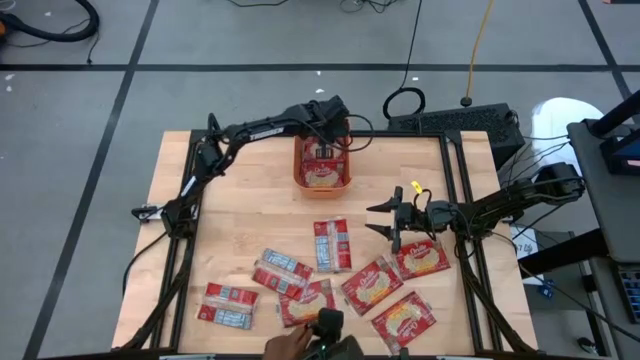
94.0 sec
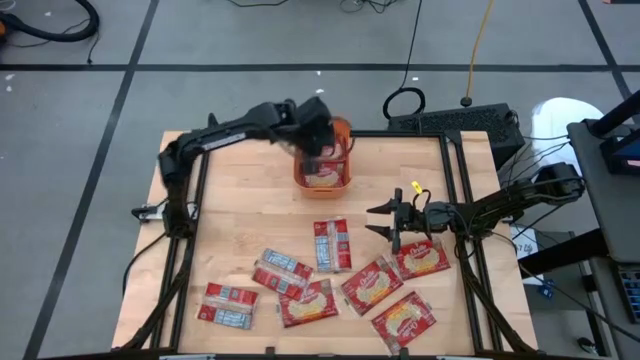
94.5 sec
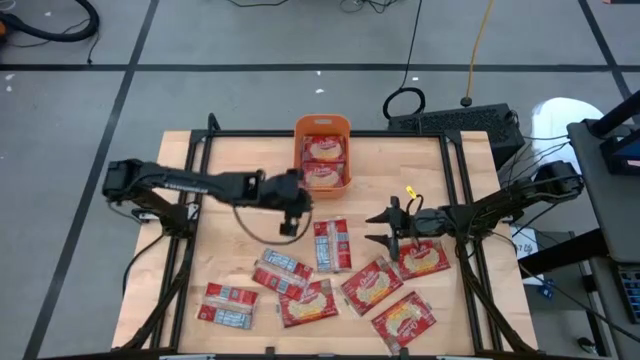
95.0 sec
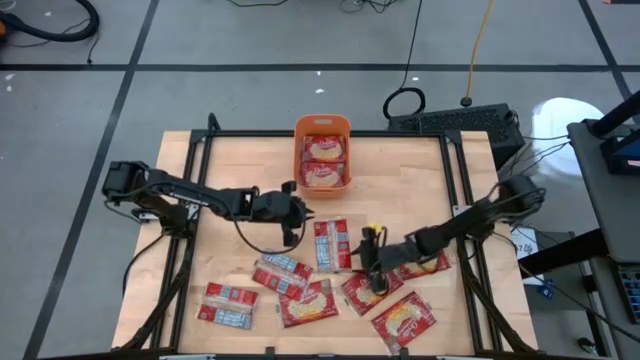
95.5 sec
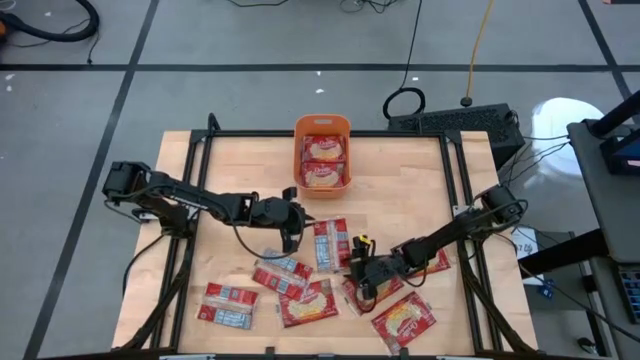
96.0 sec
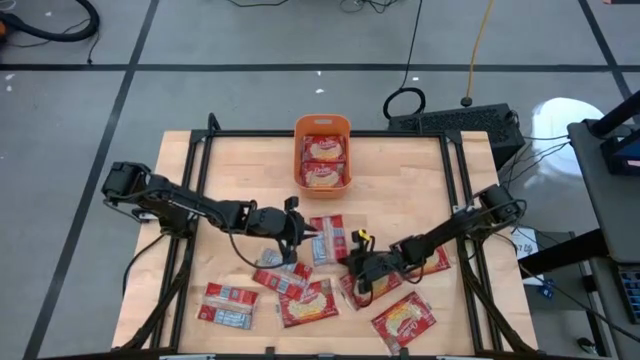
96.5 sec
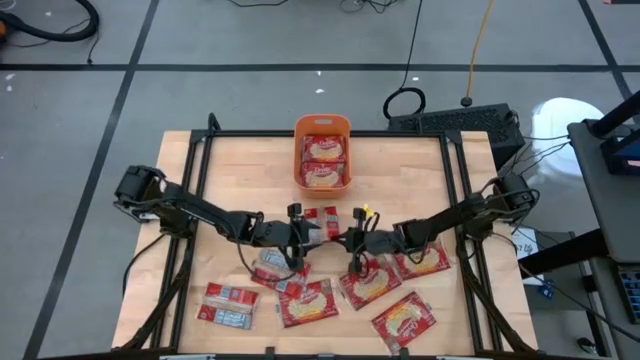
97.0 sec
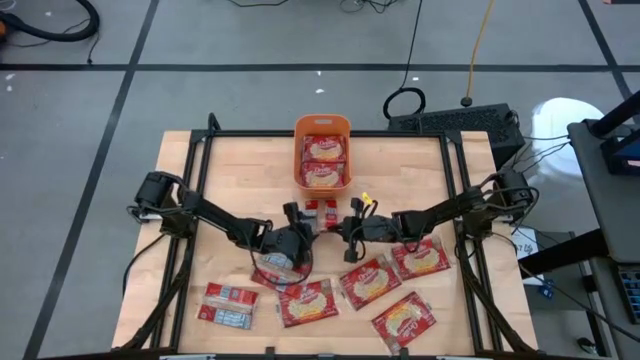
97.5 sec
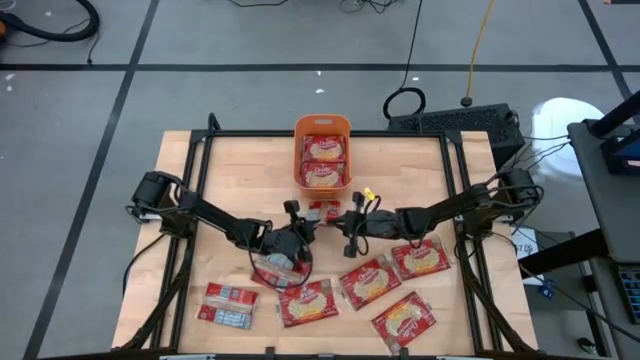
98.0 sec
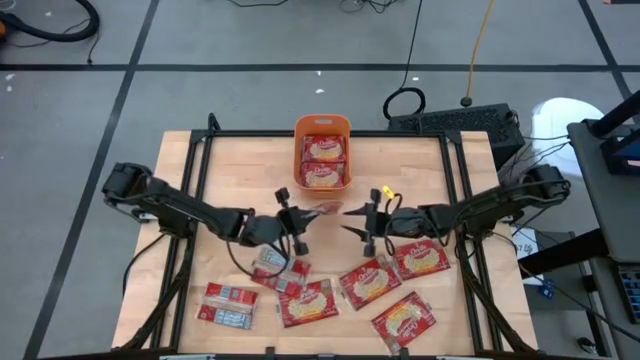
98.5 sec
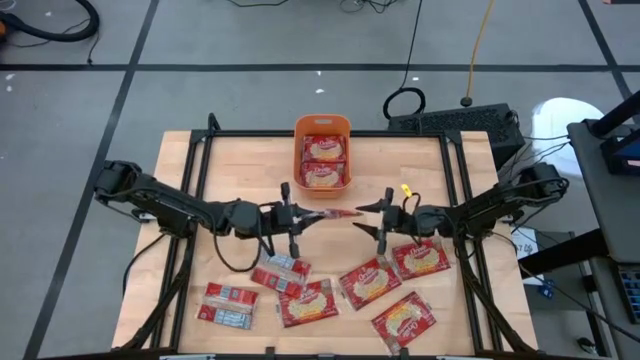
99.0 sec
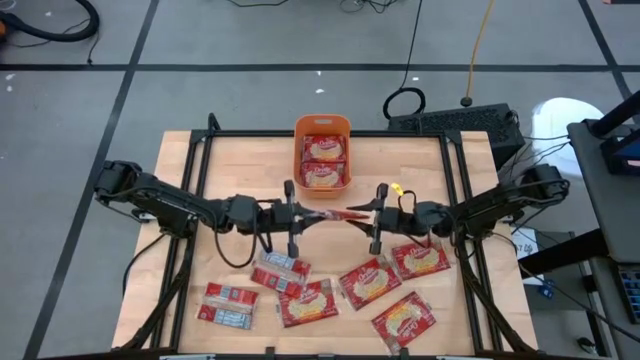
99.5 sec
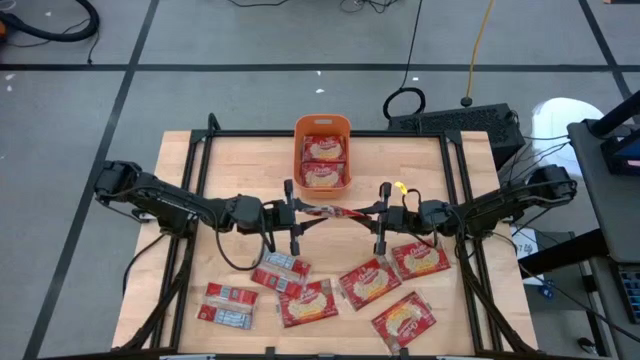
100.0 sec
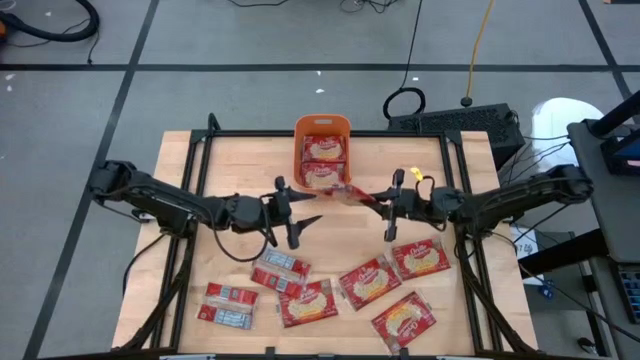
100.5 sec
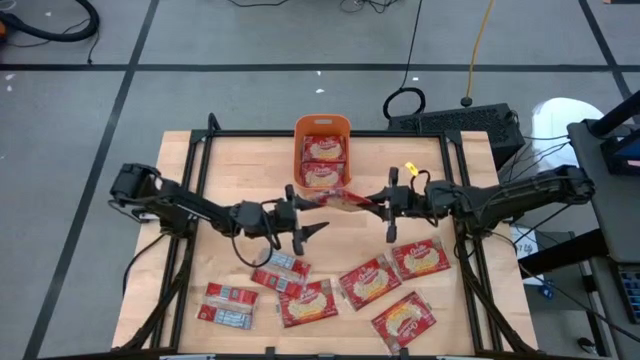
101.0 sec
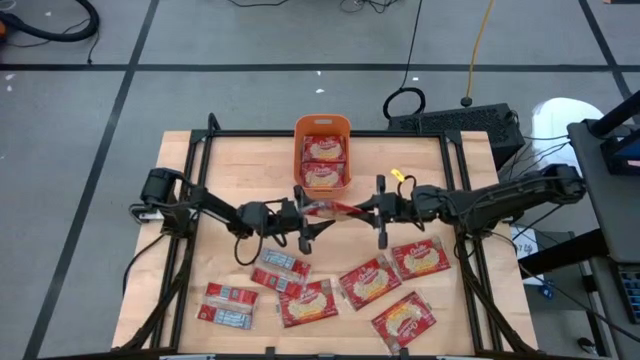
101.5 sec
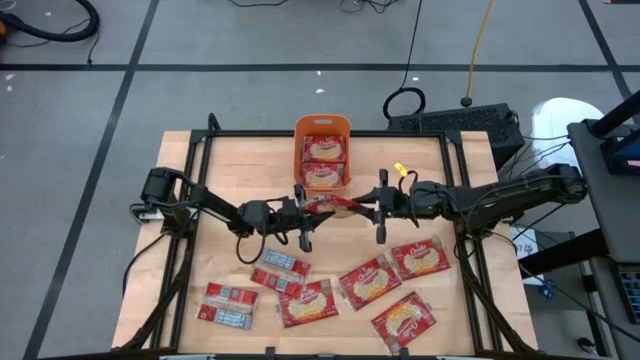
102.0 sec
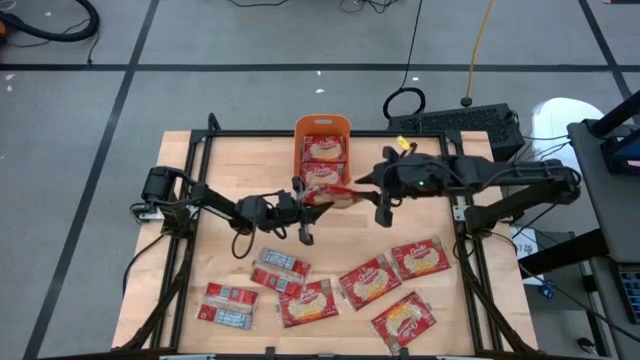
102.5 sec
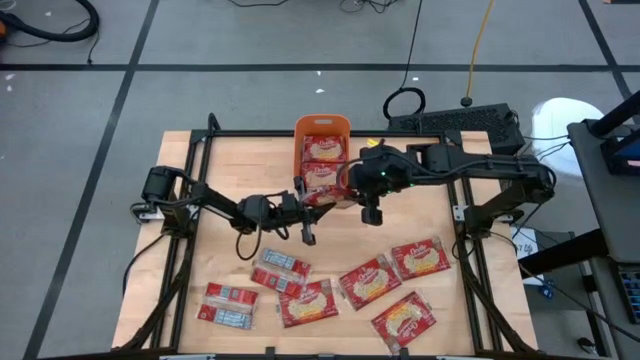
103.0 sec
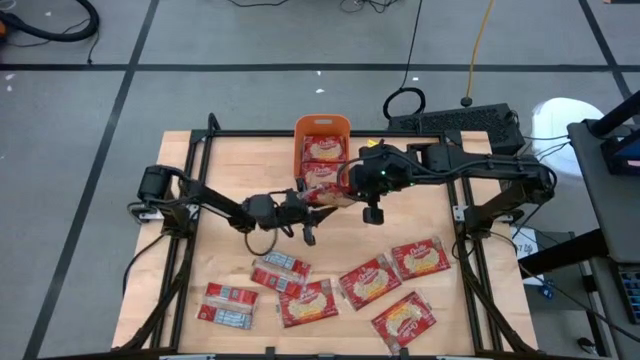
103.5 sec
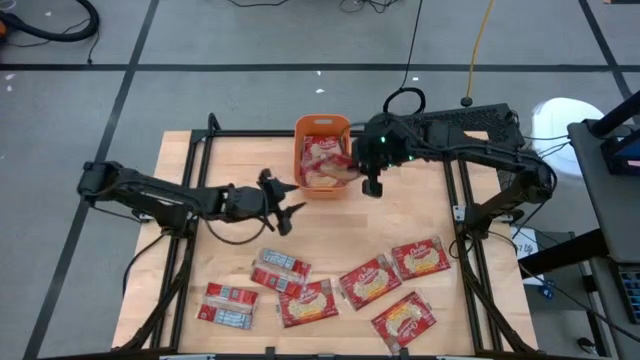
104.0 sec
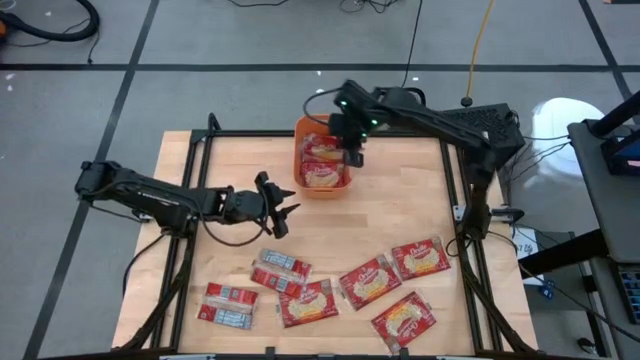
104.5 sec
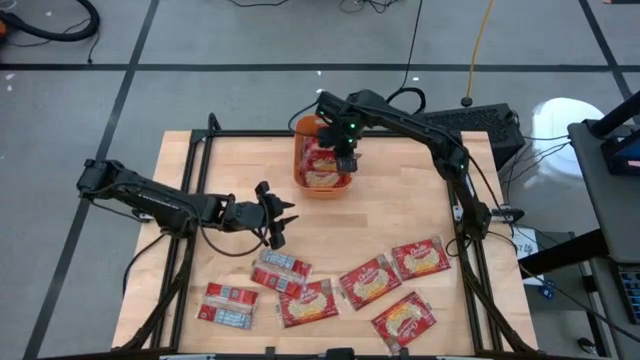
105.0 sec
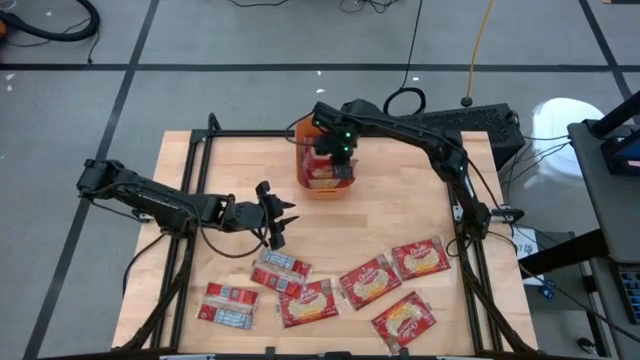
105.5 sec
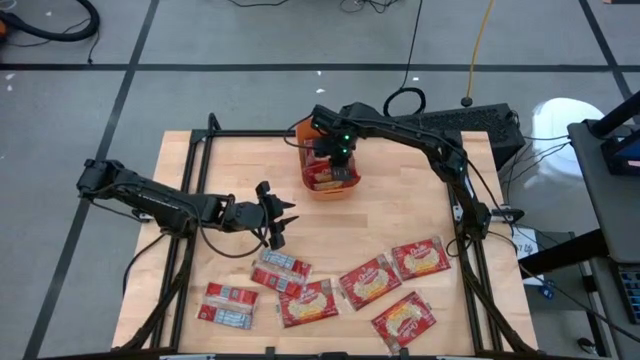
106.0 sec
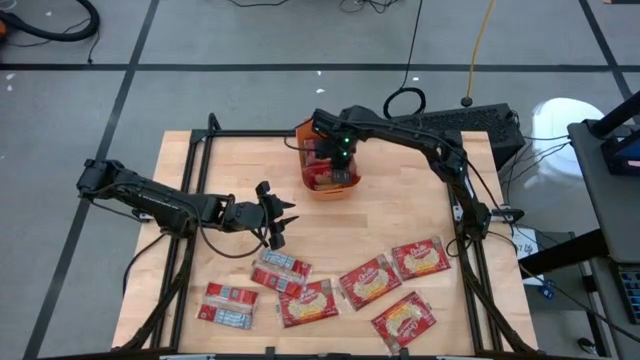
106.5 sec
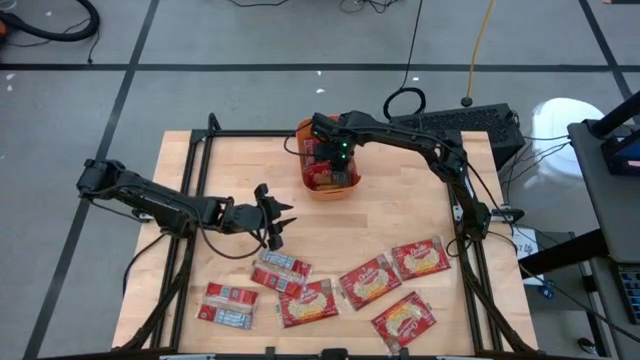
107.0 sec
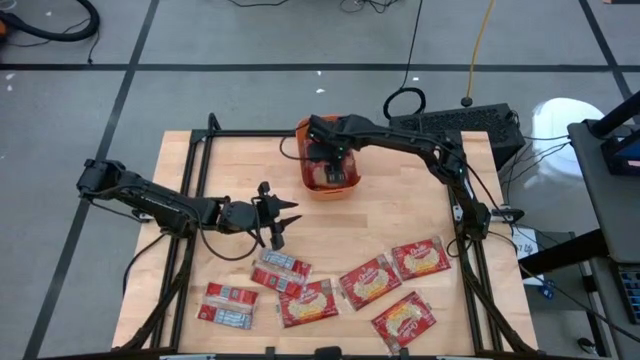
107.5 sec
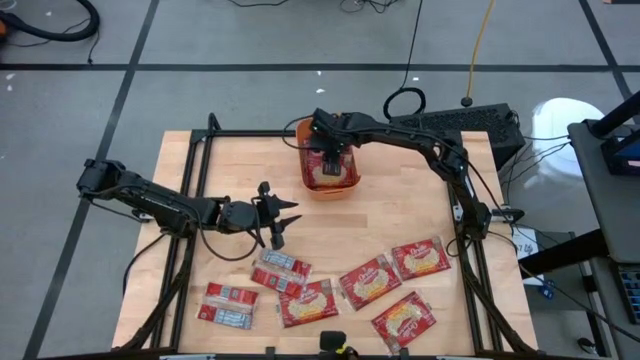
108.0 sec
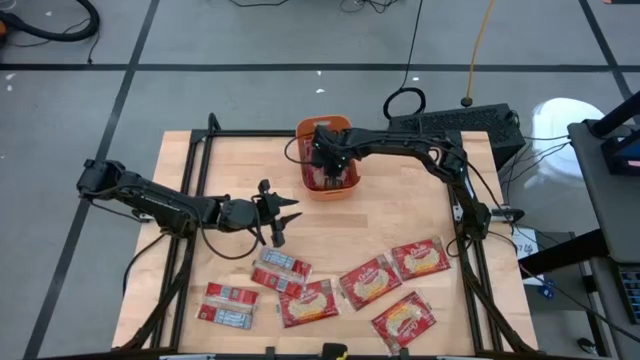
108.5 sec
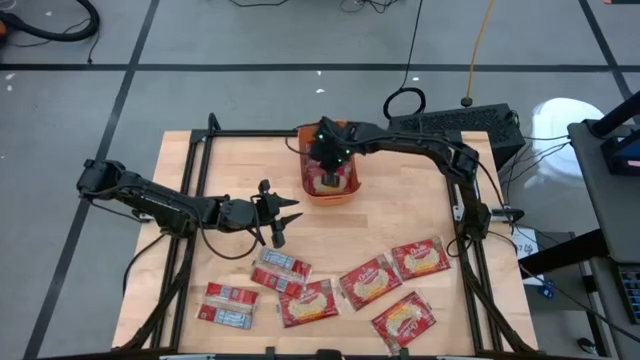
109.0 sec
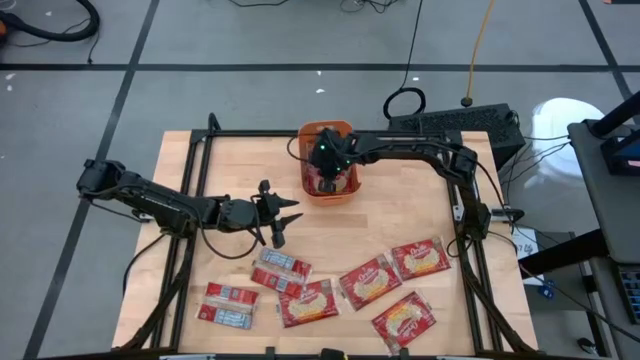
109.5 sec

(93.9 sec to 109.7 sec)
Task: Sort popcorn bags into baskets
Put the red popcorn bag into the orange bin

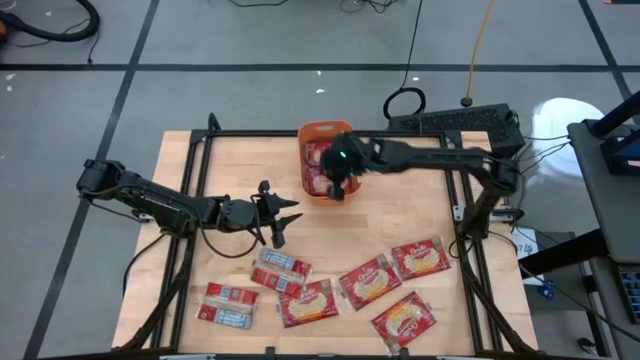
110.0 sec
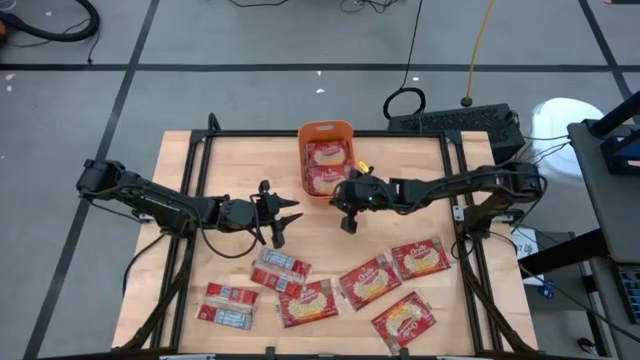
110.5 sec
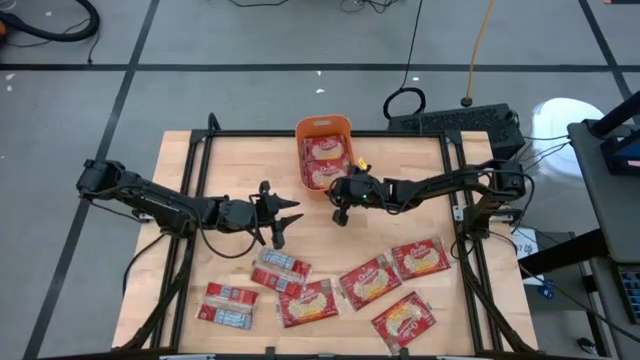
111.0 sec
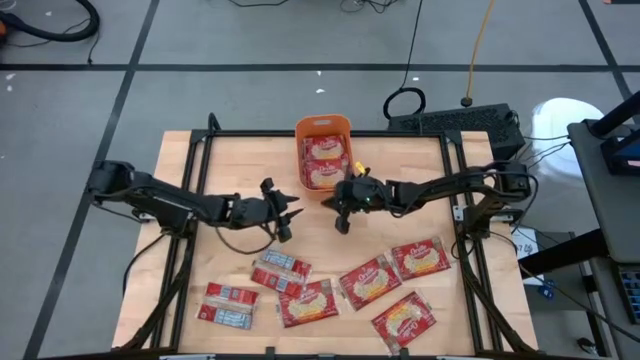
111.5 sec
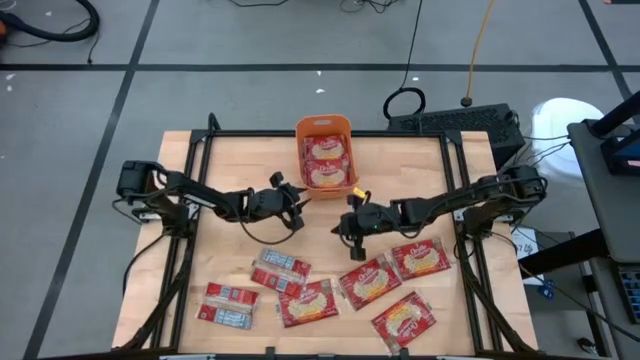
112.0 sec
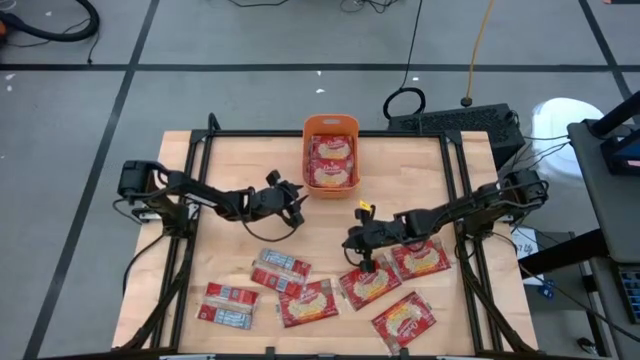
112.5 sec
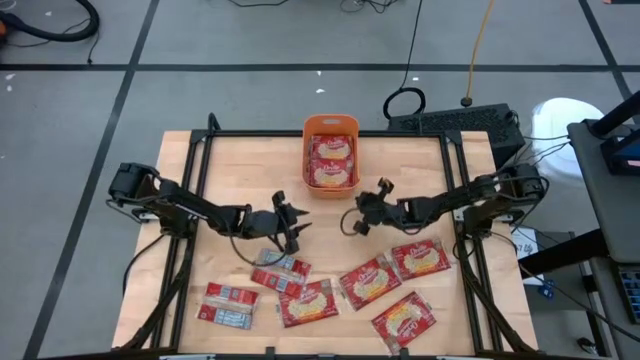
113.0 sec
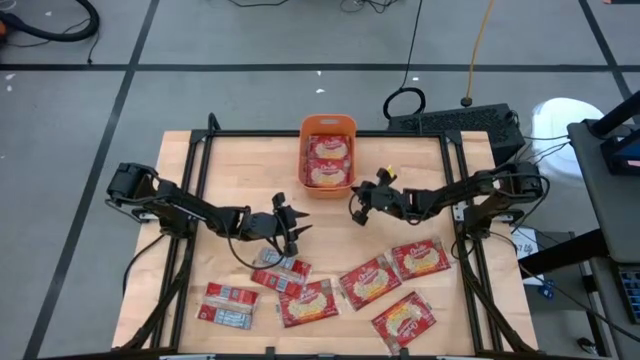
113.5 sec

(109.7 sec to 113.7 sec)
Adjust orange bin on the table

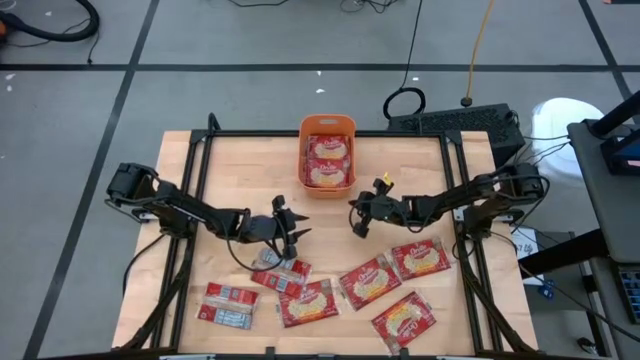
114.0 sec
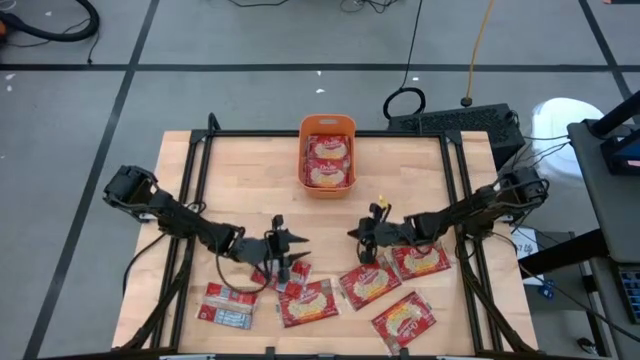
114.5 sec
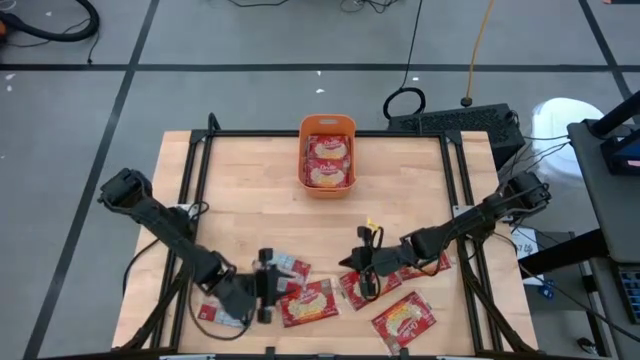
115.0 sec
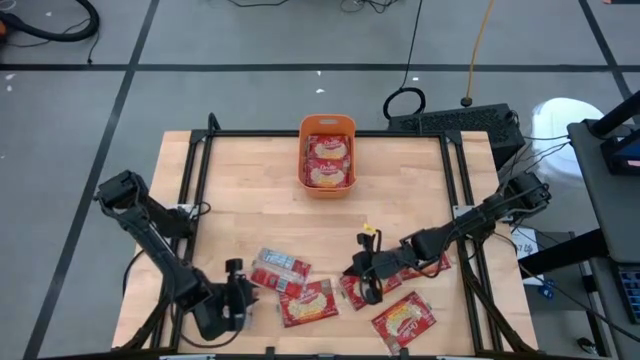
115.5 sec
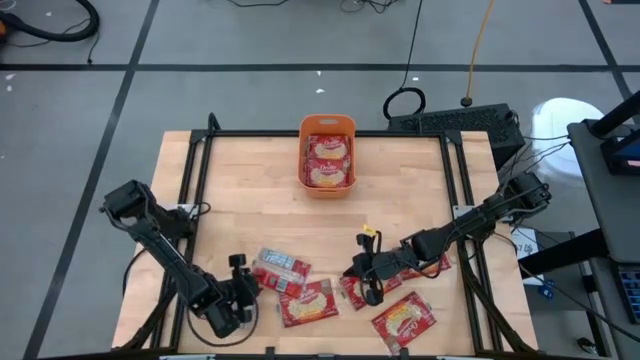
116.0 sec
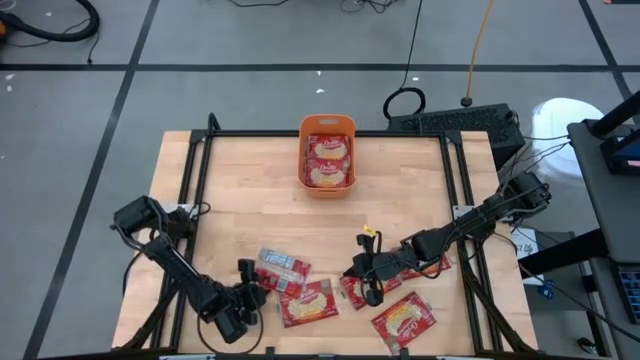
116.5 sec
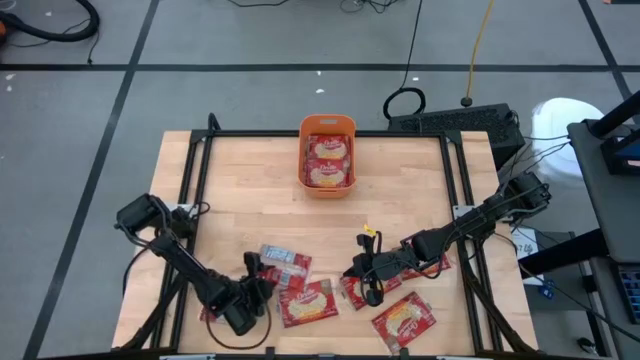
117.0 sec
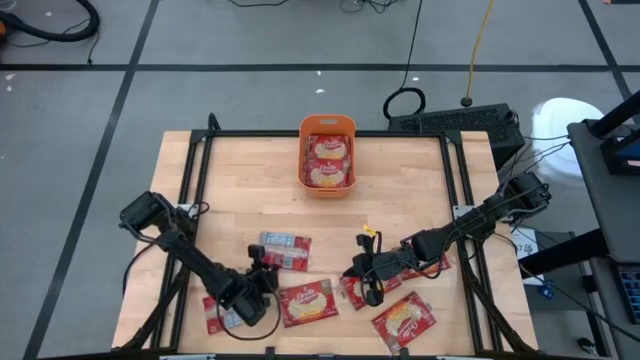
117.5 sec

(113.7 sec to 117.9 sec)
Put the red popcorn bag into the orange bin
